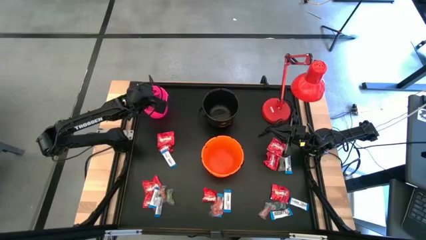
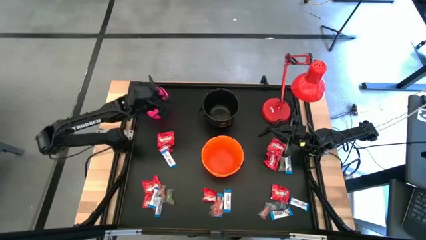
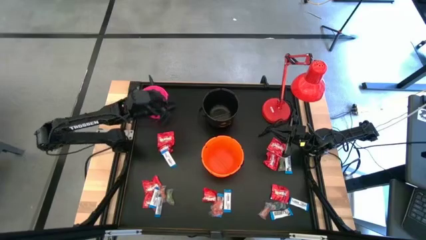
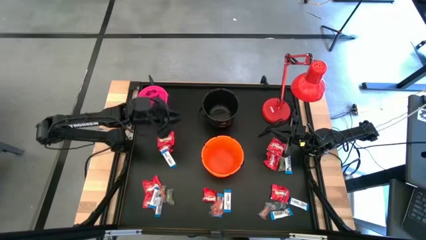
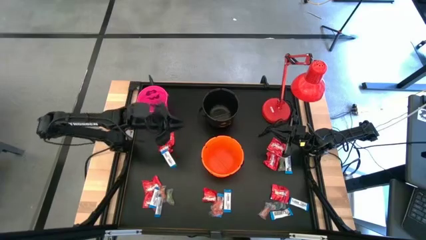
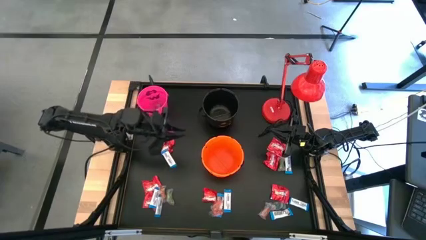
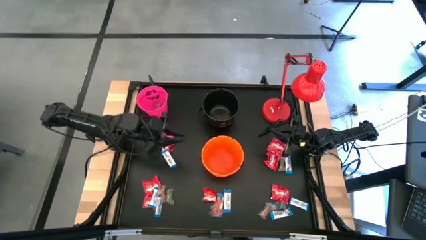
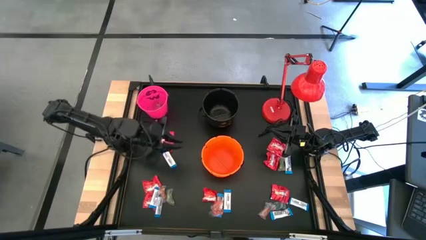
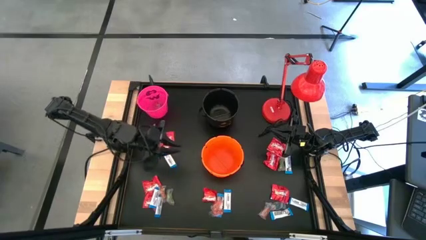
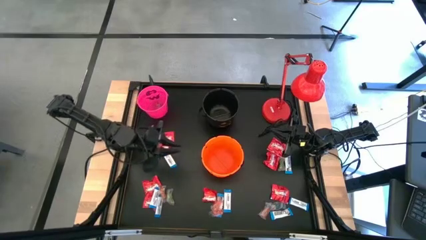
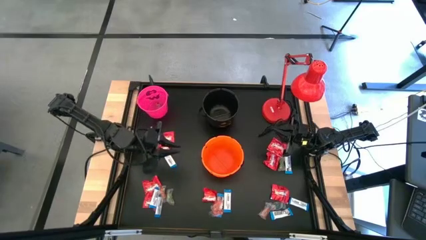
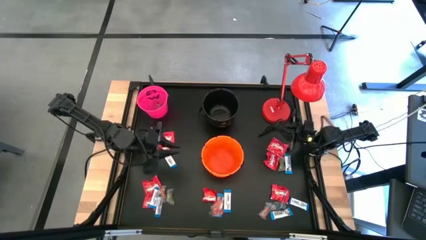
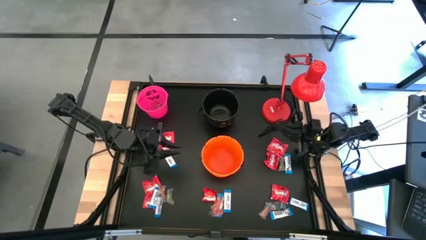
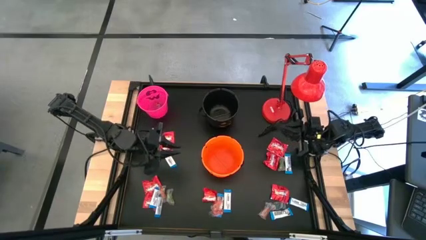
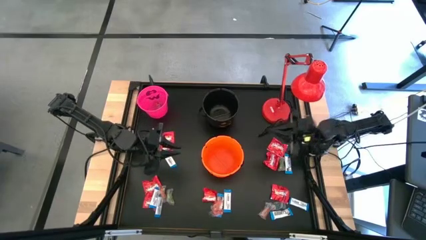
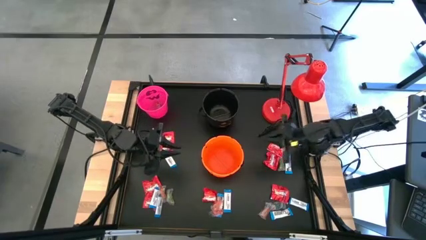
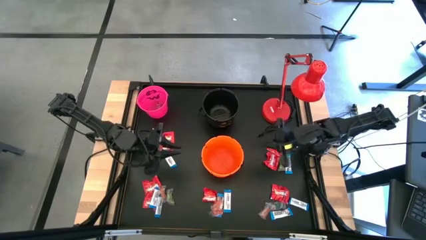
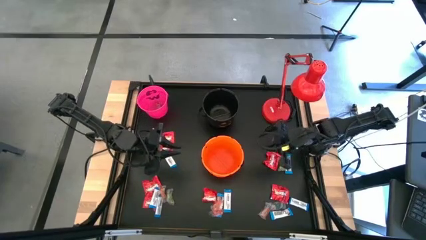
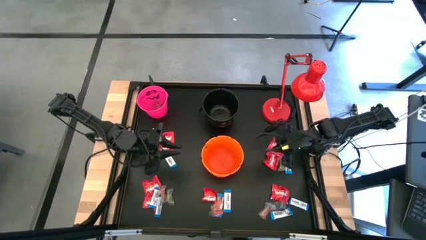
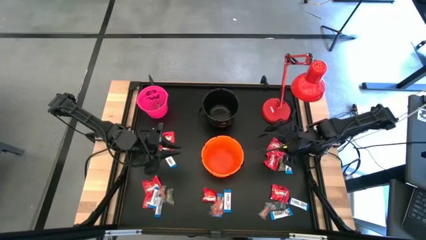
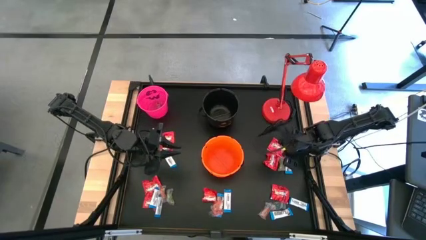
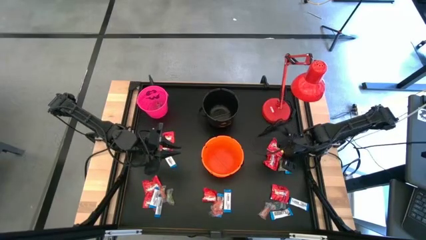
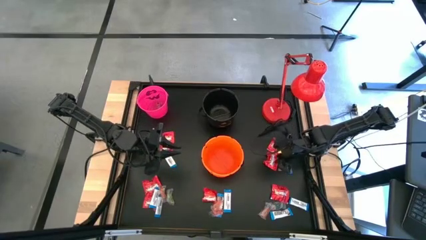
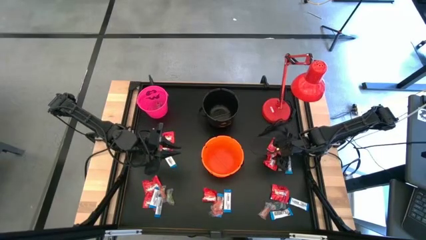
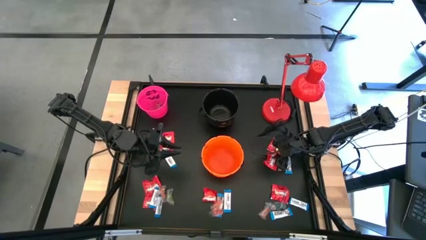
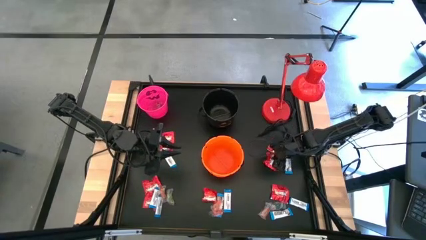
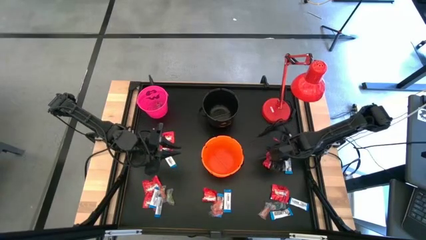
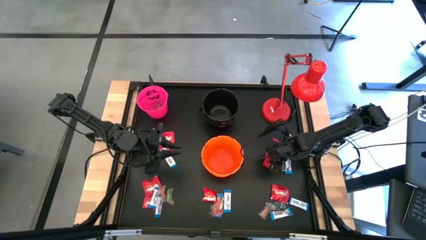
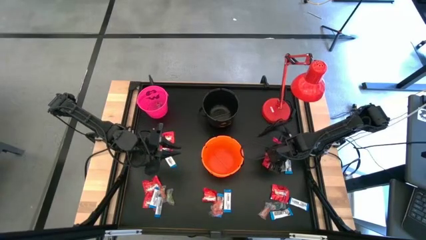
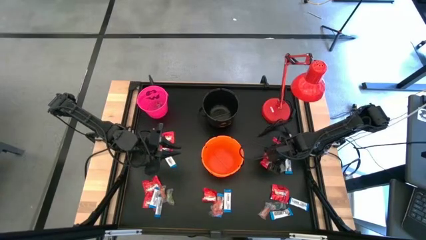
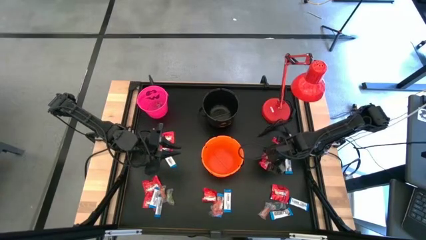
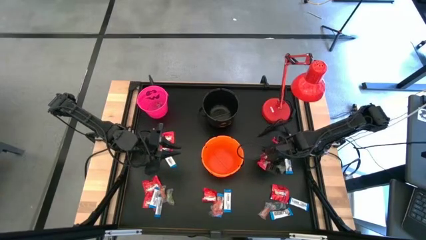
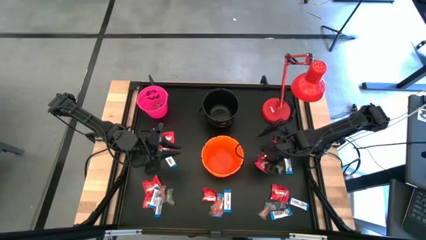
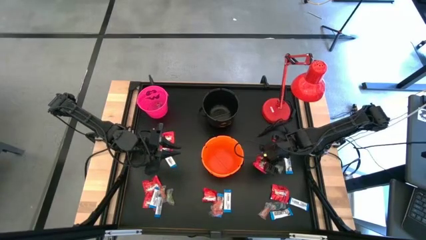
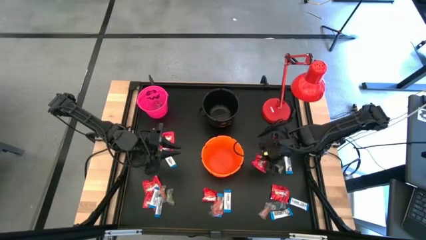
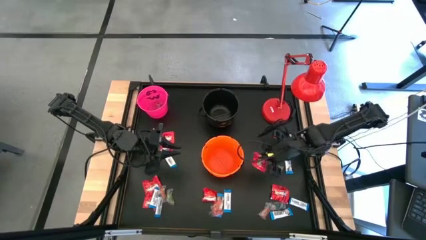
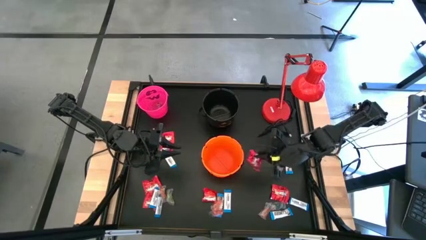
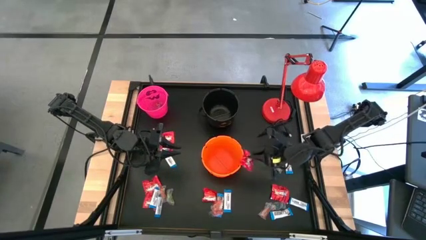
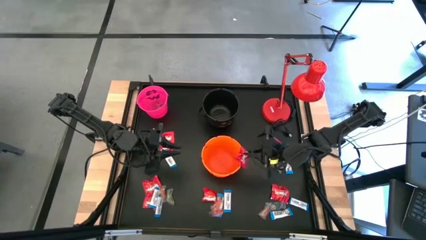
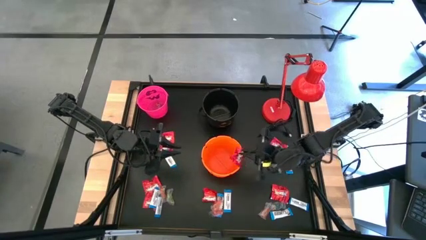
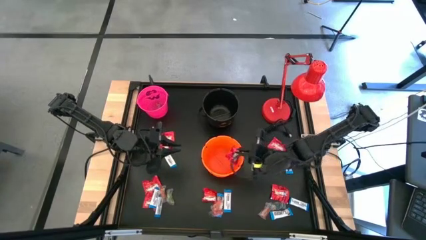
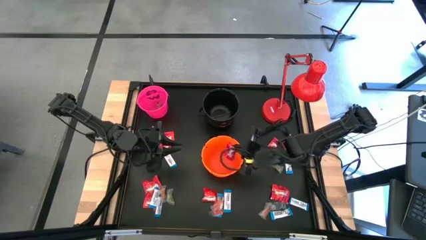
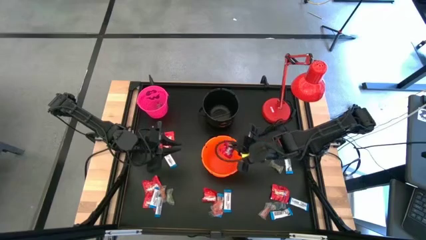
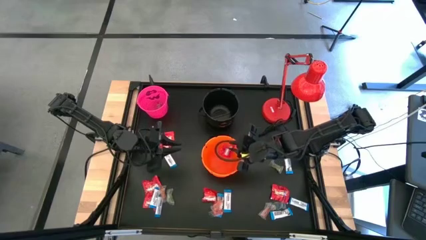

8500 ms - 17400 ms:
Task: Sort candy
Put the red candy into the orange bucket

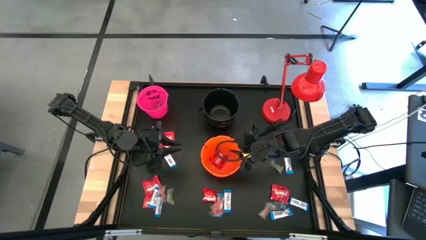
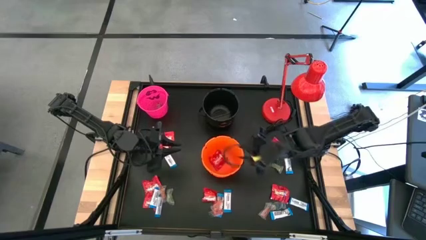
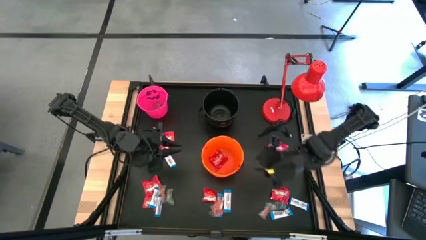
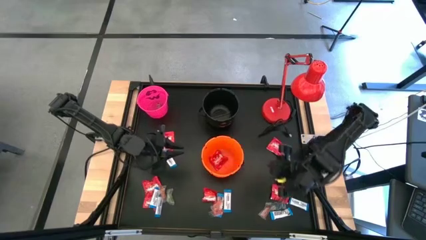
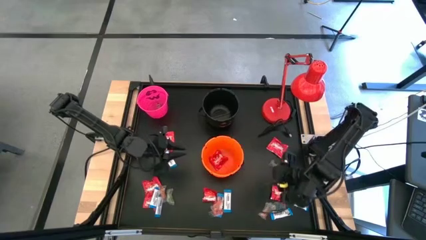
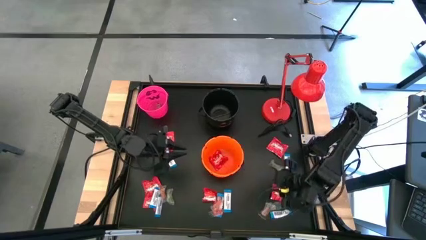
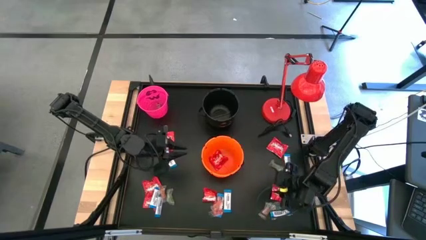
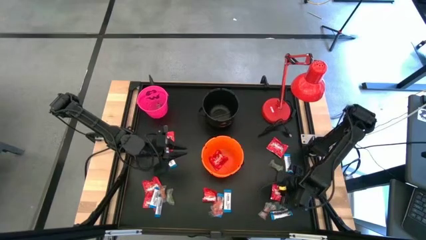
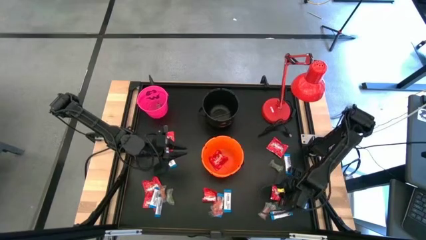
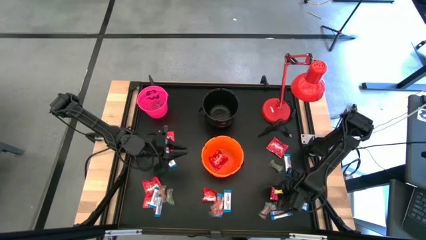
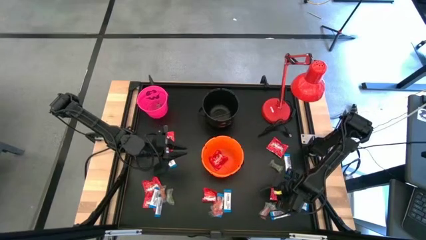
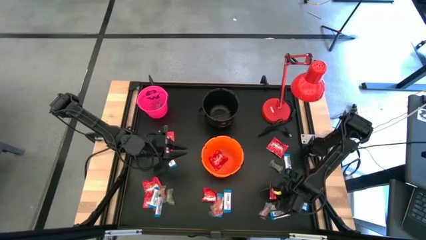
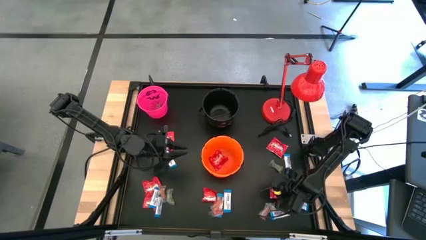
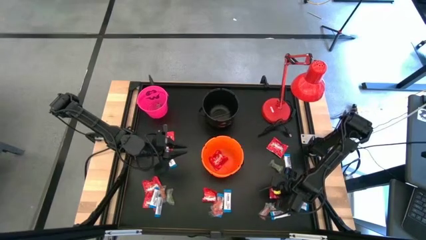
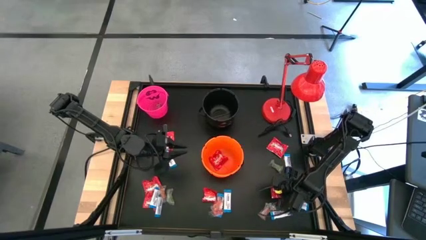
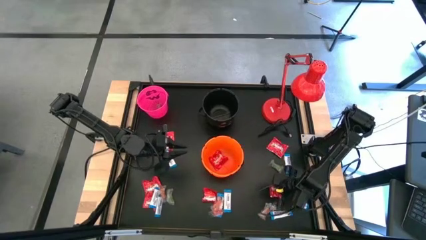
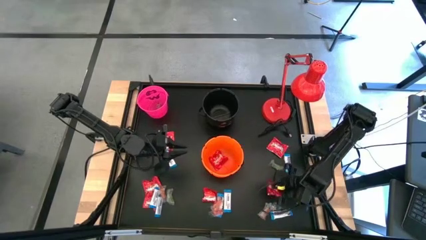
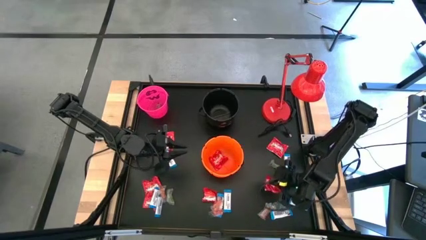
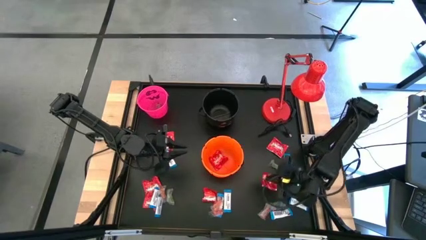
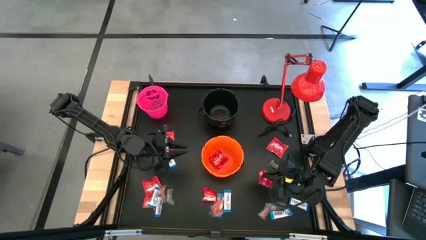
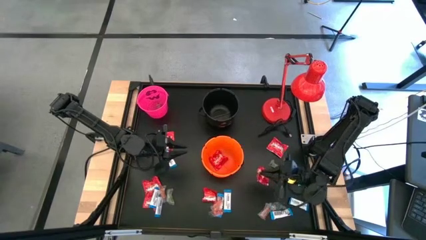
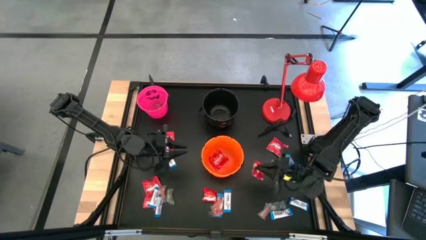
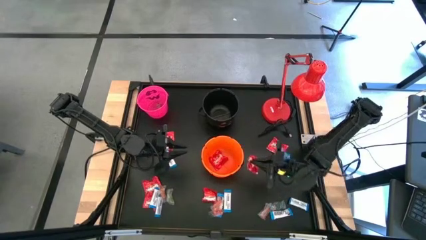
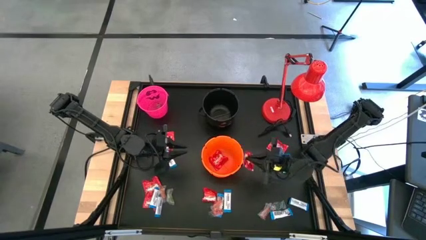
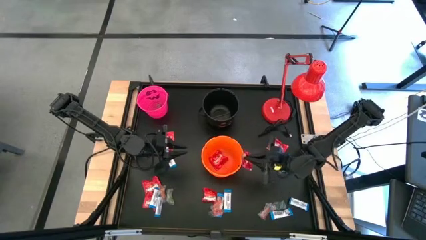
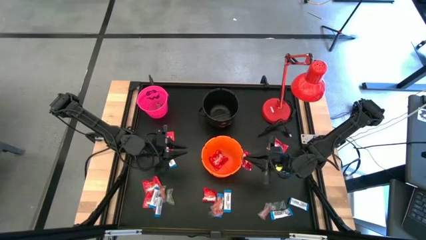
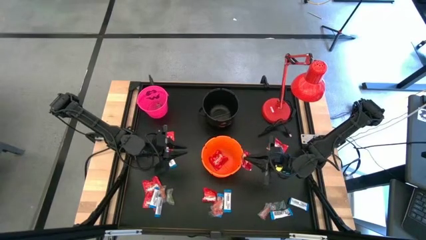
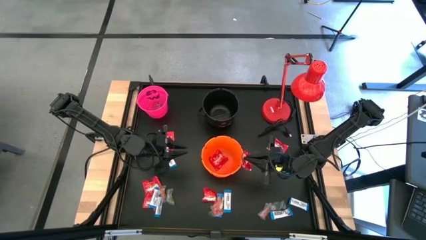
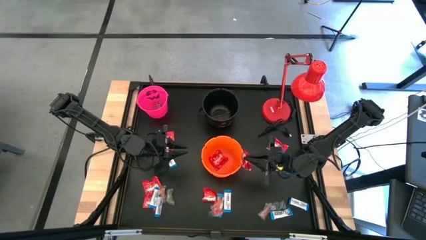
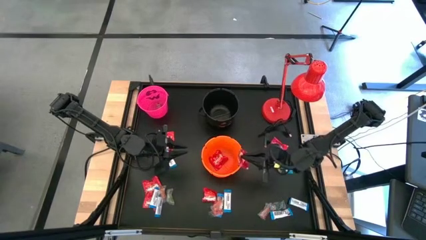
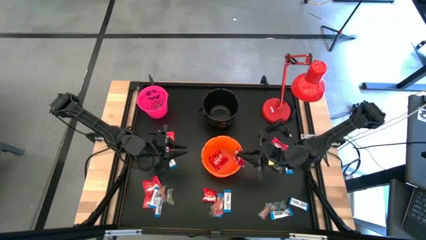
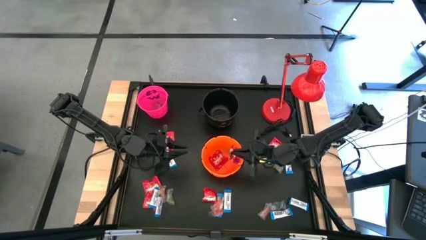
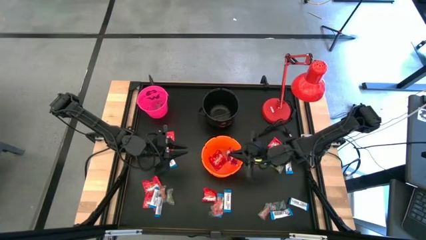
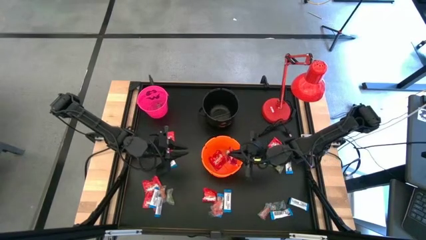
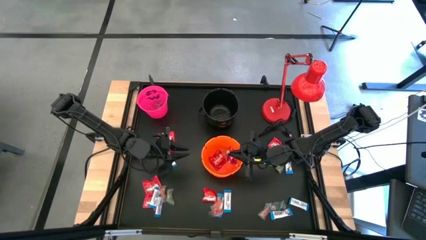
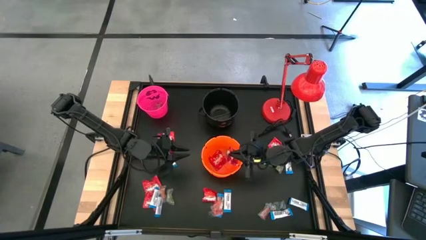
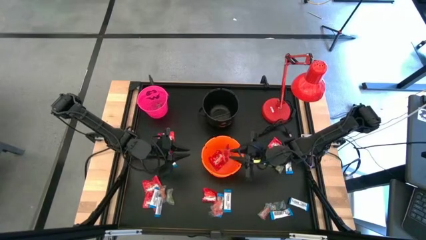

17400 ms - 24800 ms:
Put the bottom right red candy into the orange bucket
